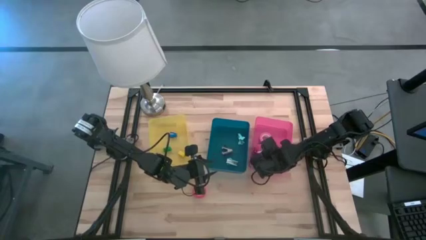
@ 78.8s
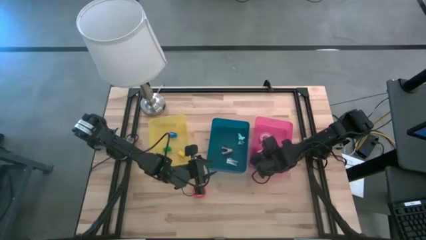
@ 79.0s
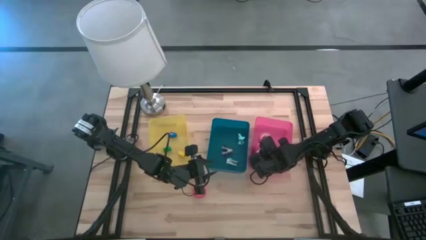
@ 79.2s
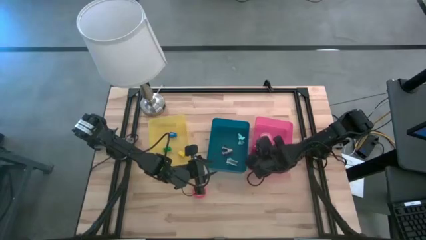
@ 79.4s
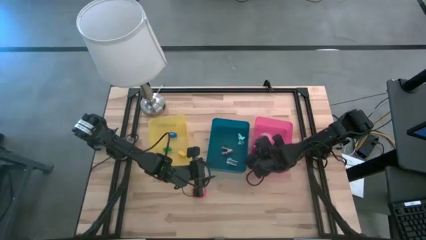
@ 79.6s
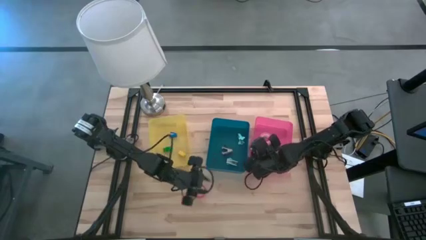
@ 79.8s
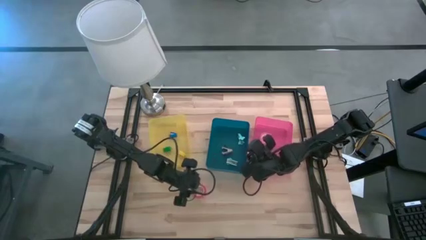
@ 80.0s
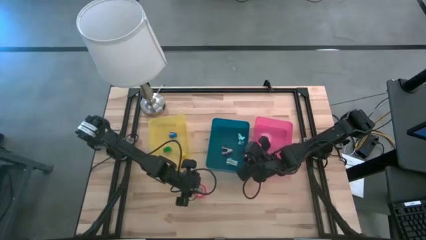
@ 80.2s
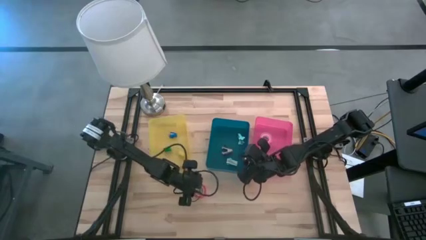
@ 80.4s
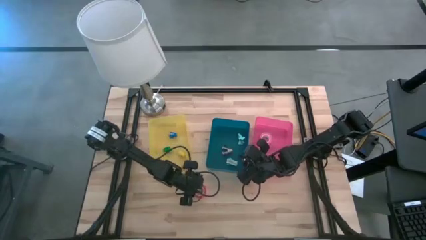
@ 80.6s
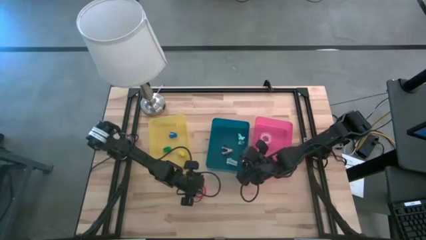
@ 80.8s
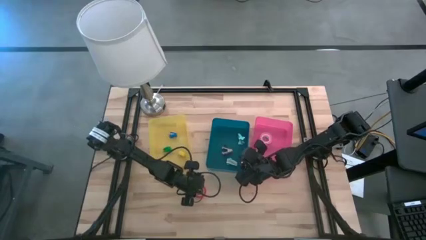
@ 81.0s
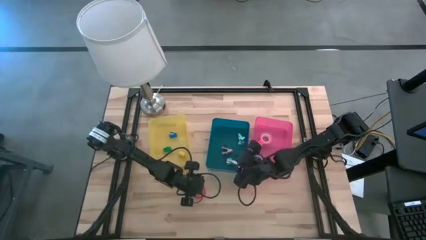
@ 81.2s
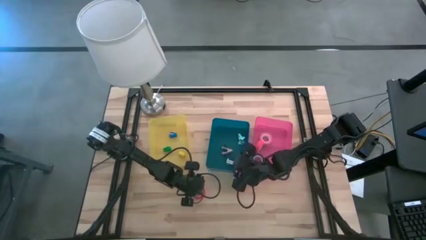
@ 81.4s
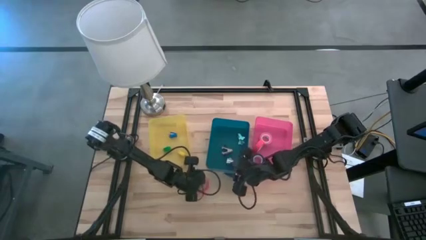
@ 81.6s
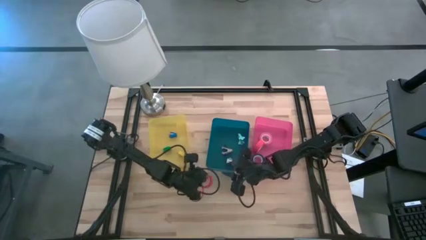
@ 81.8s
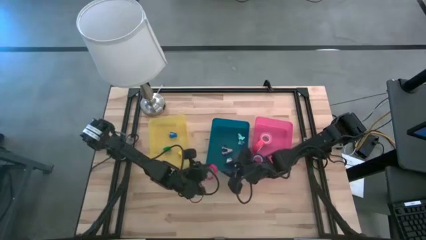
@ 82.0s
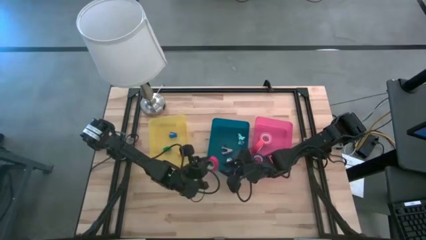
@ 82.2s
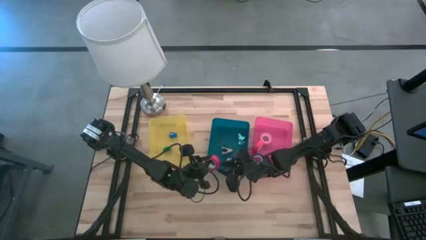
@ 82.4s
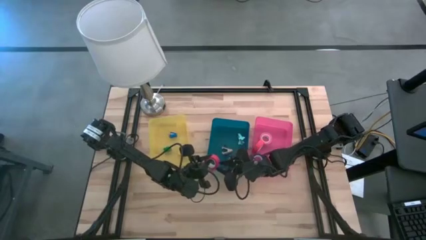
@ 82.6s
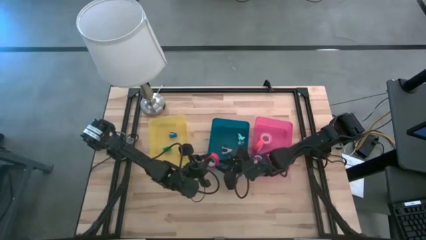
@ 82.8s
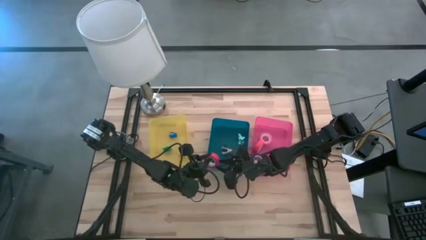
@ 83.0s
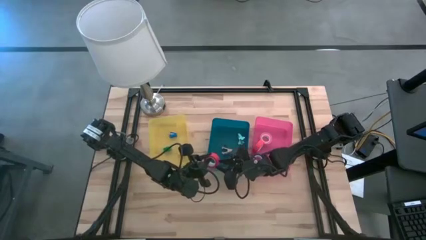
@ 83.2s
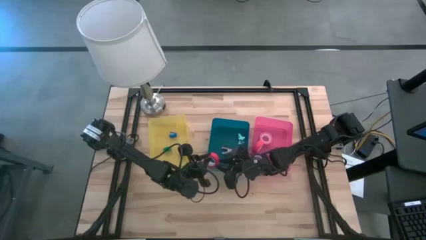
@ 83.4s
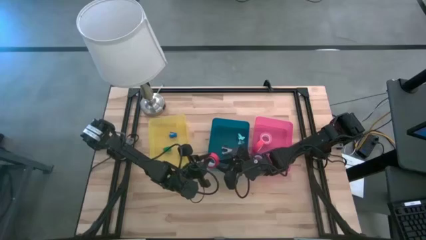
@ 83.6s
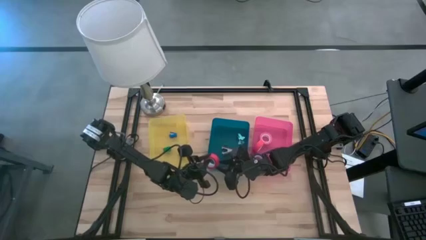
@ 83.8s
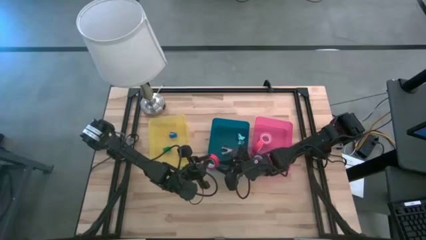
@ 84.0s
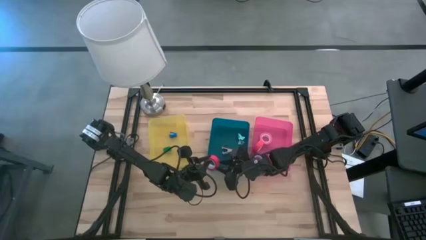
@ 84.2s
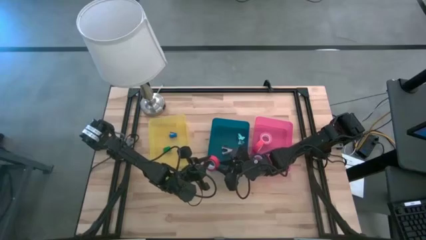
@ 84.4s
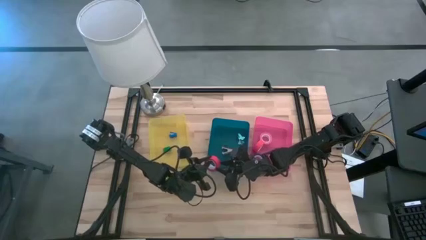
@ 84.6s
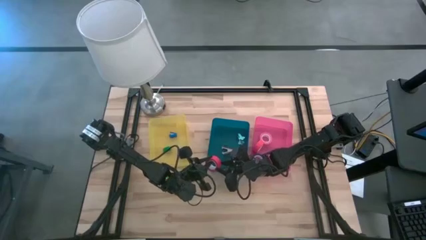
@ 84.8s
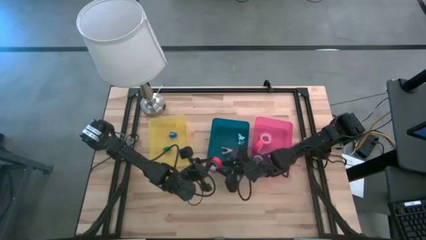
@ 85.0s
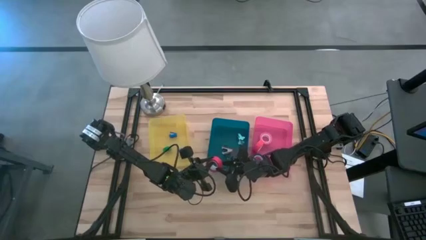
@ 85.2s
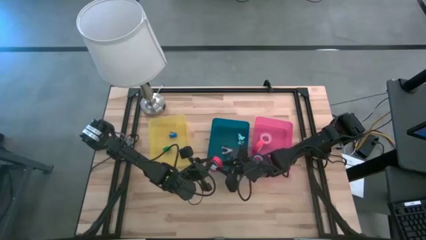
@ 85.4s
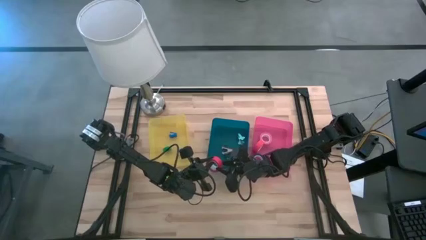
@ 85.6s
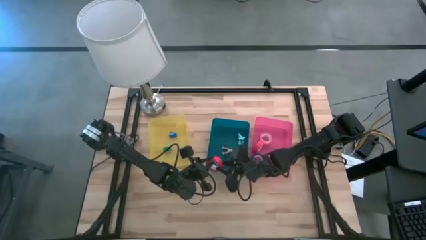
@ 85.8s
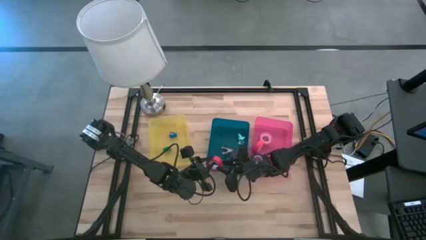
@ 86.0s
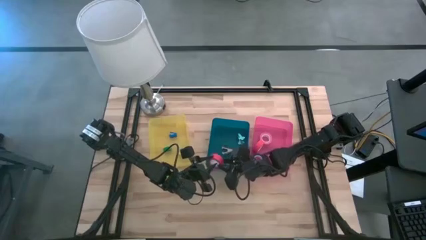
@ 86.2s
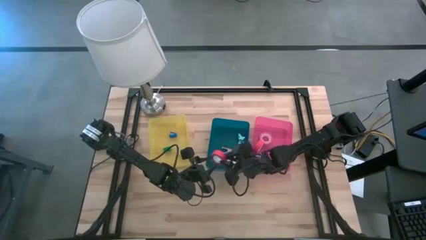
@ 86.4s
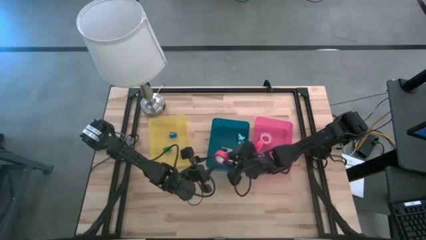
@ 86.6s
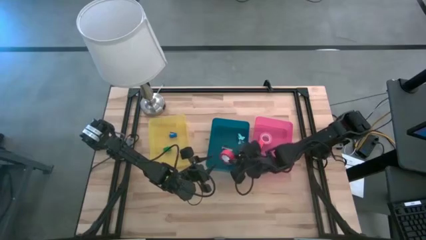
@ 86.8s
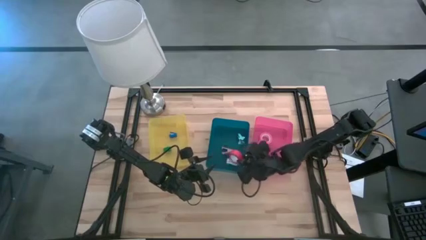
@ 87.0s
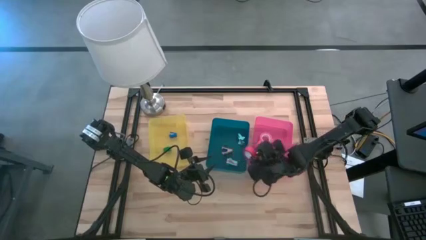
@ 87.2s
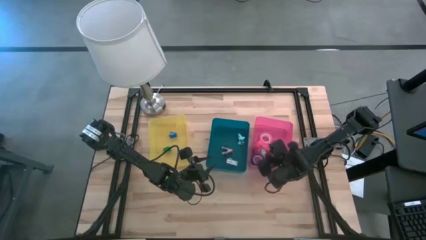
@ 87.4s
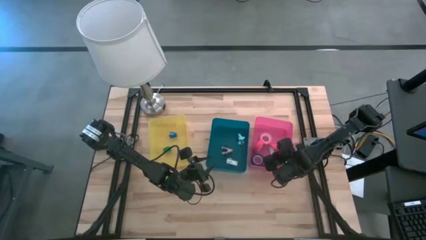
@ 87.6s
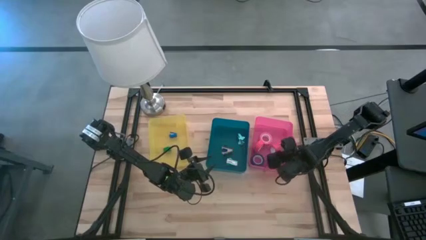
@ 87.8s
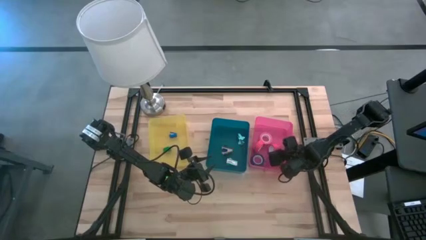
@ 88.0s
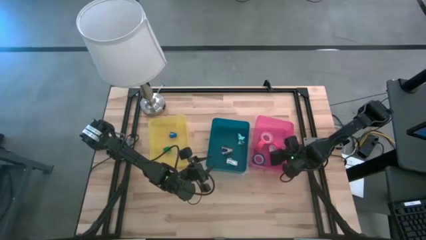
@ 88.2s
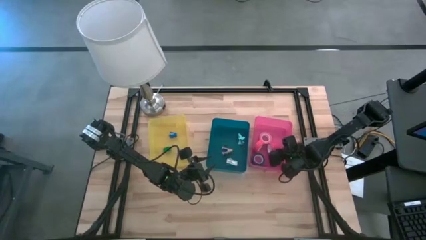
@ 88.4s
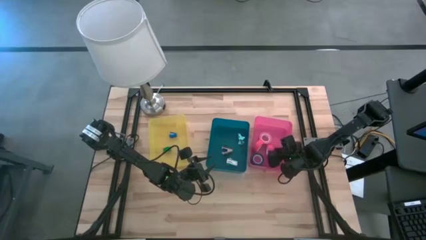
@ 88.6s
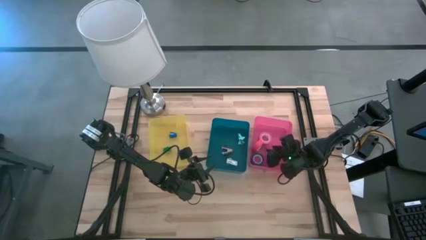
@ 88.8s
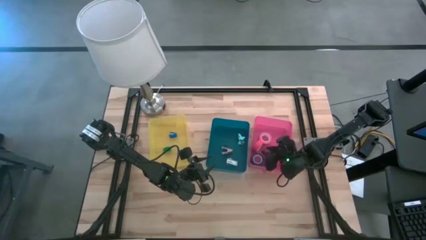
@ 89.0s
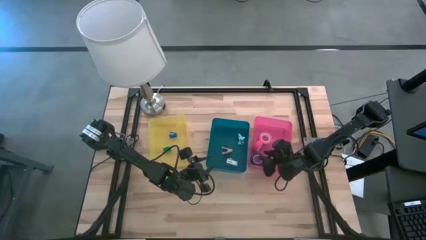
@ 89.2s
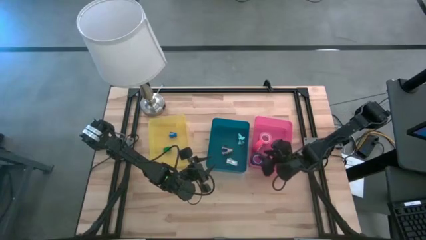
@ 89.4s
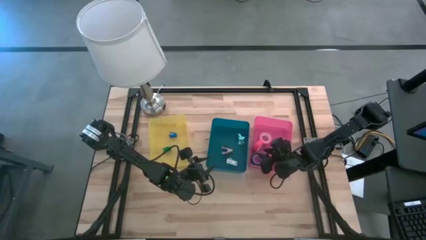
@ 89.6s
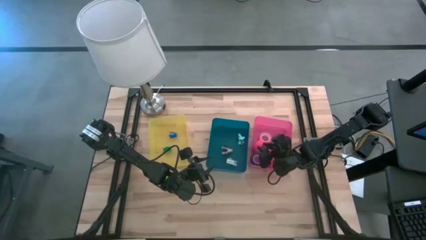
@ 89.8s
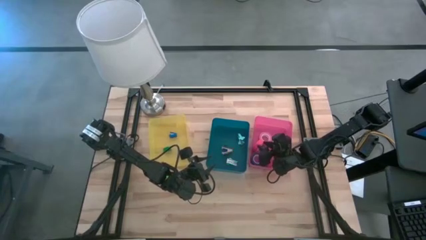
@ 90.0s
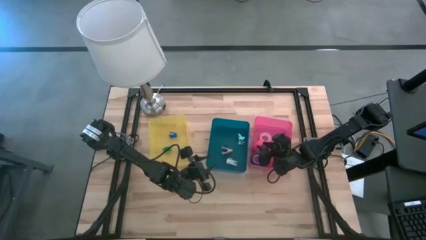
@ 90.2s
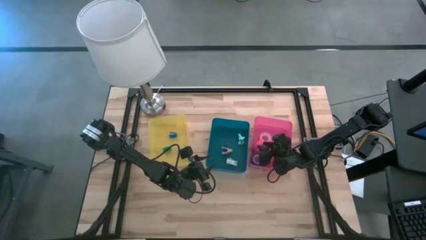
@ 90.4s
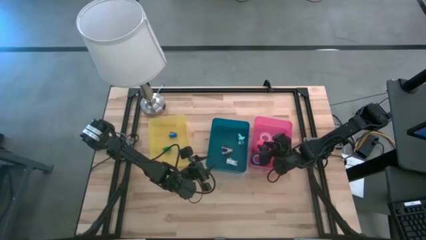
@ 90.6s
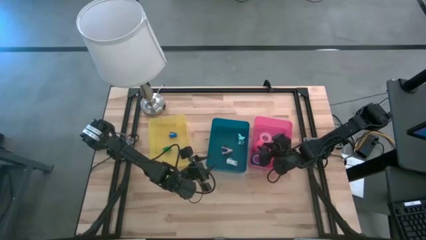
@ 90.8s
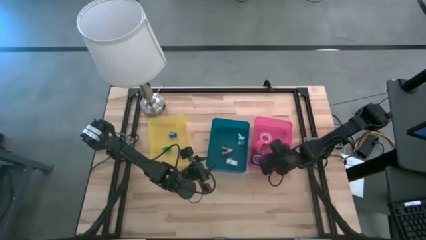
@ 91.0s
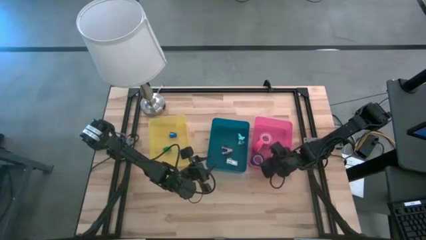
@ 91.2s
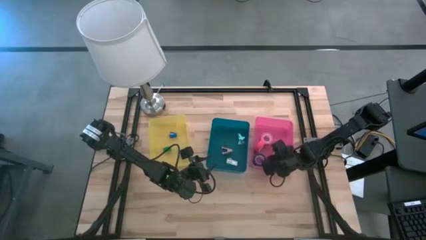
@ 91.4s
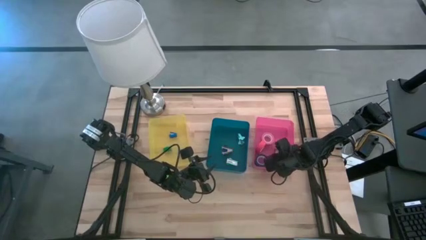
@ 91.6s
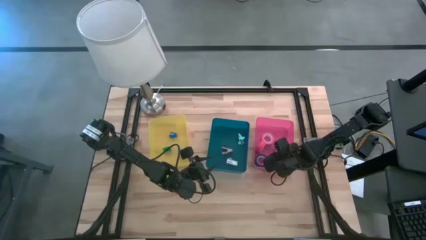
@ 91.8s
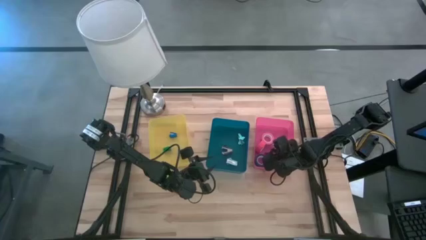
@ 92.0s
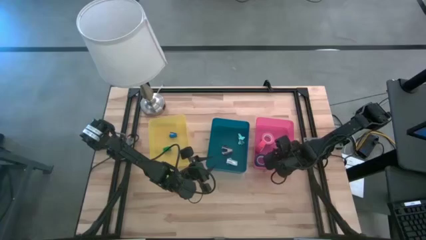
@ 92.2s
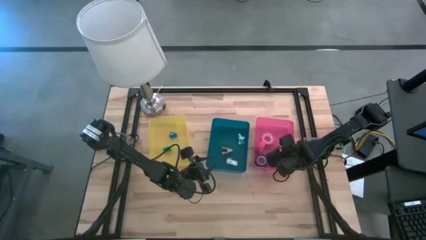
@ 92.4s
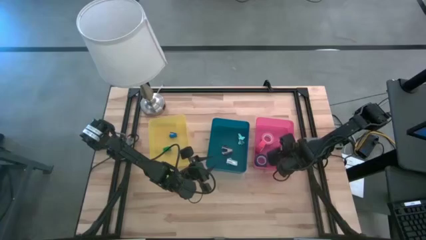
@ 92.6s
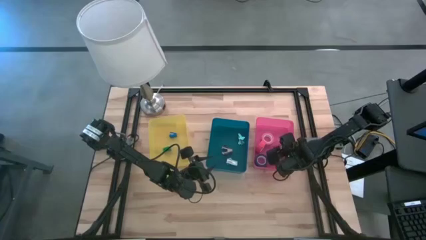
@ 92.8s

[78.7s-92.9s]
Task: Pick and place Stapler, Stapler remover, tape
Put the red tape into the pink bin

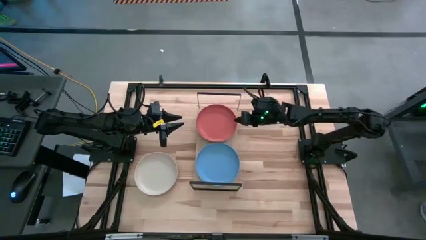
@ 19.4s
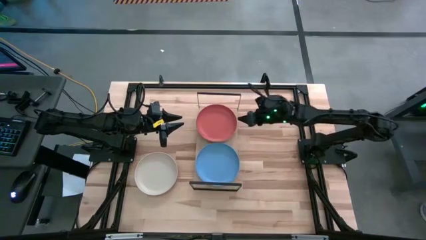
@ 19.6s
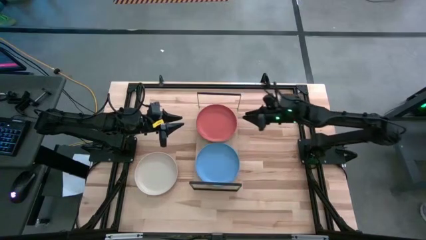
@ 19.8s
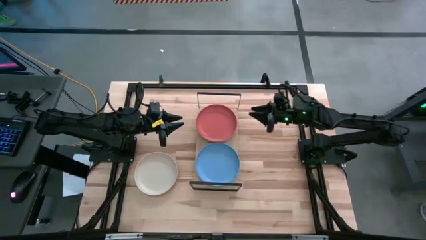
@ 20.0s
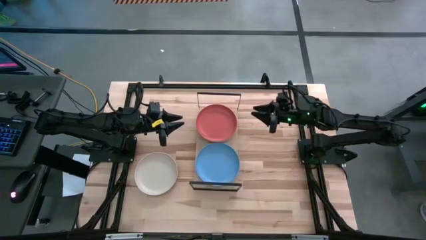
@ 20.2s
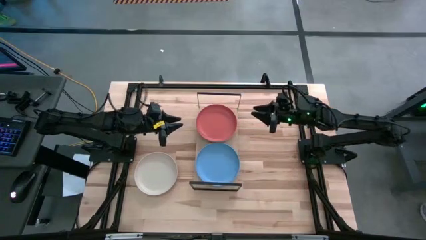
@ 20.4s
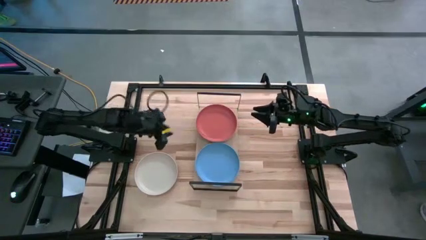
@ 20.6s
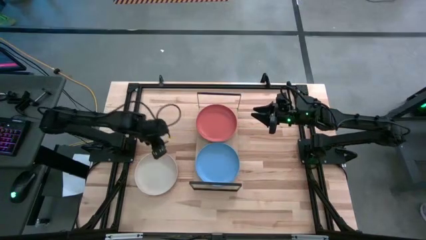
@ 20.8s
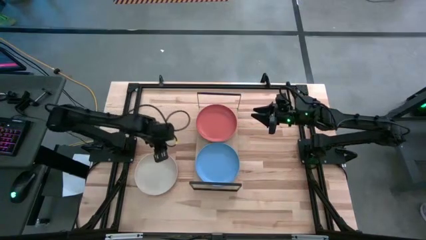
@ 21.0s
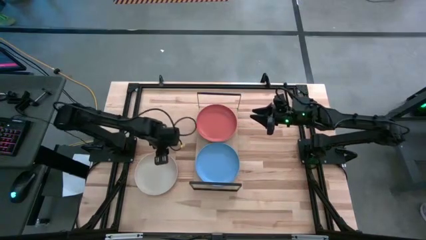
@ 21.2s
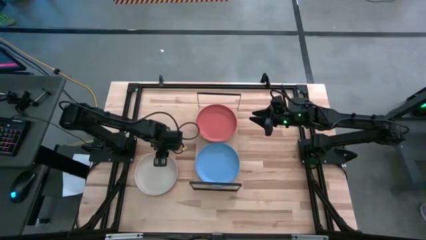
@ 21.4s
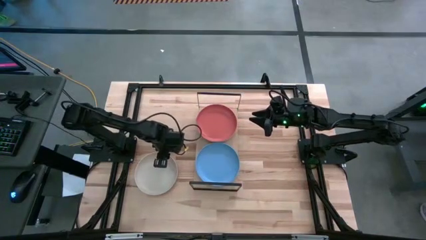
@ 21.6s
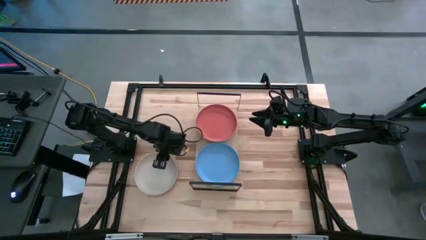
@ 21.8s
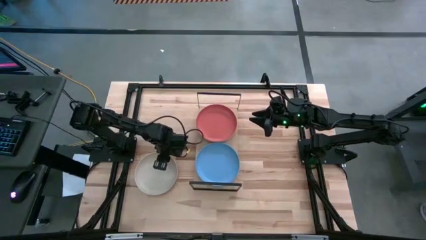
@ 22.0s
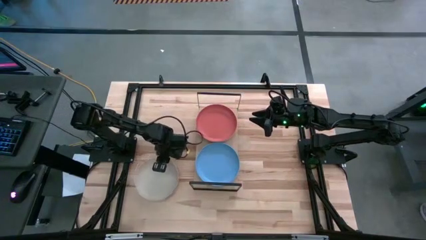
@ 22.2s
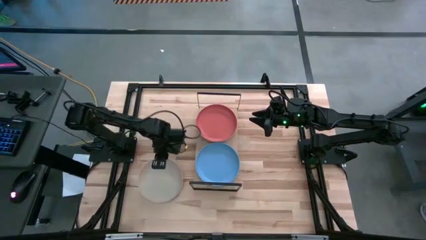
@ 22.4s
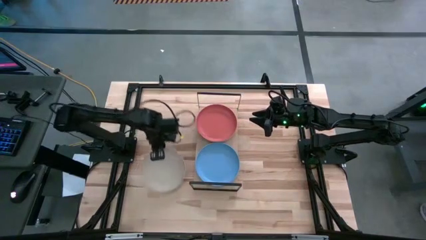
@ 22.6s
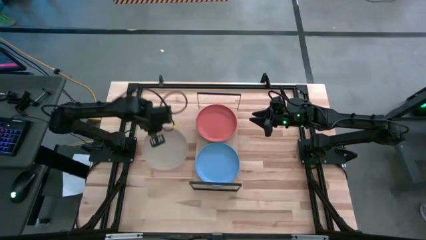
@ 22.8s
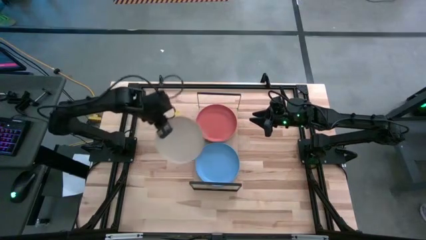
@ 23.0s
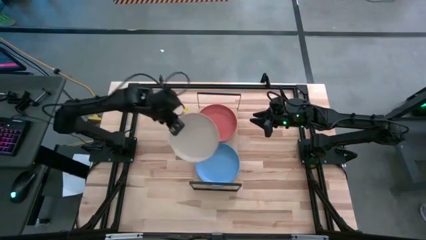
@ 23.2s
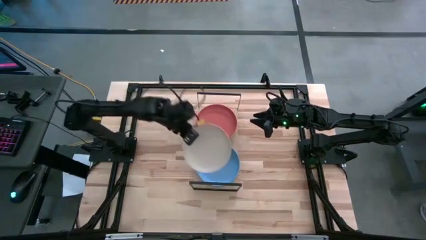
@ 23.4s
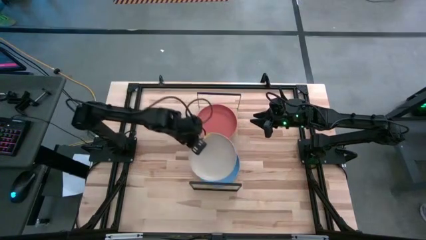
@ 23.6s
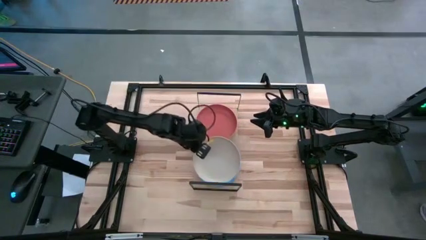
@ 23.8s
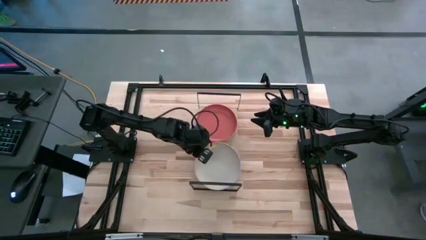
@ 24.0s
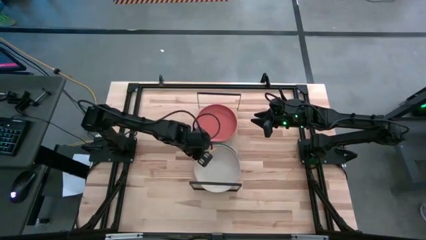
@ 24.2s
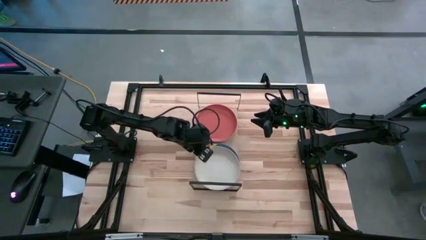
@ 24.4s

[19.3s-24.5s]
Task: Place and stack plates onto a shelf
Stack the gray plate on top of the blue plate on the shelf
